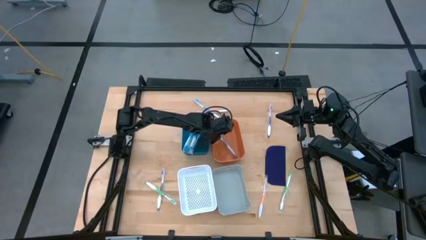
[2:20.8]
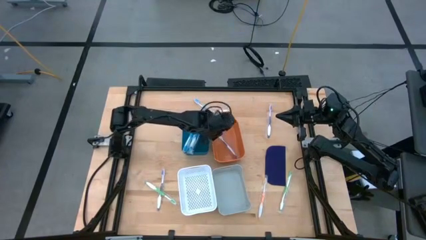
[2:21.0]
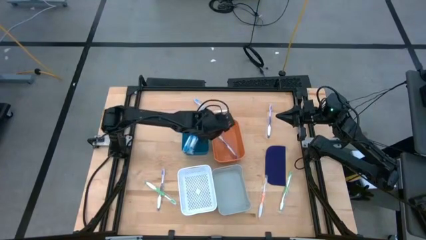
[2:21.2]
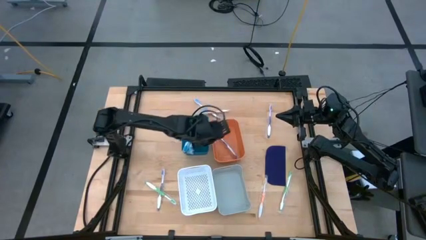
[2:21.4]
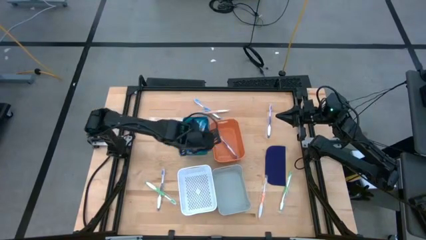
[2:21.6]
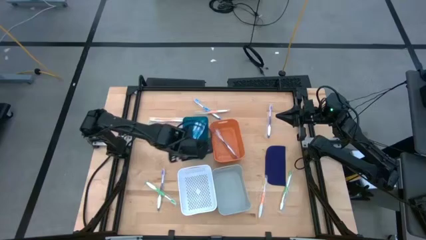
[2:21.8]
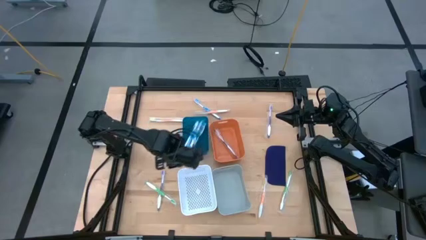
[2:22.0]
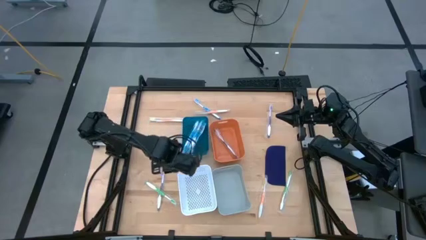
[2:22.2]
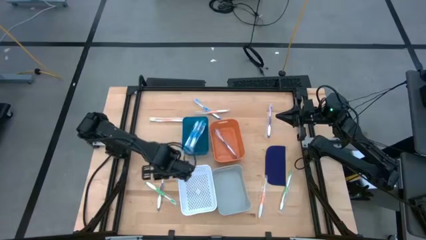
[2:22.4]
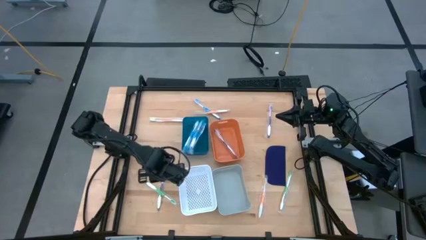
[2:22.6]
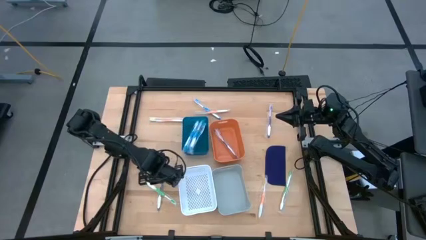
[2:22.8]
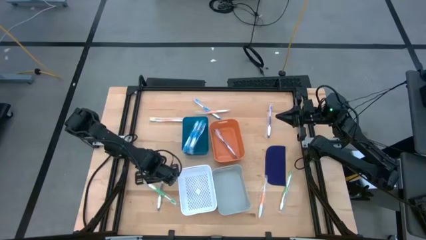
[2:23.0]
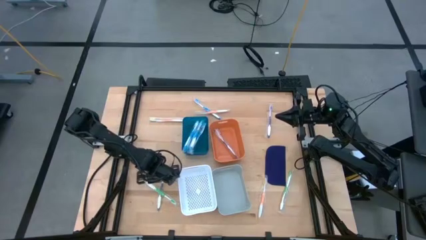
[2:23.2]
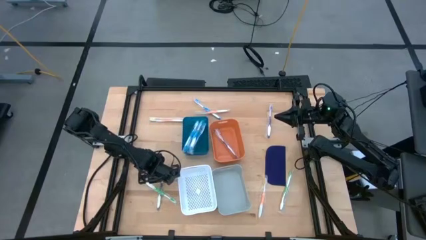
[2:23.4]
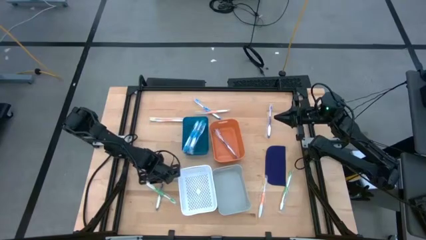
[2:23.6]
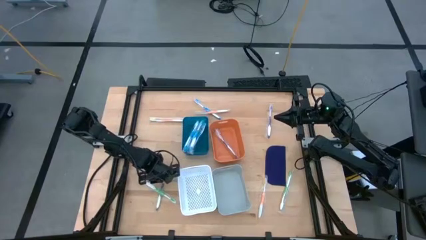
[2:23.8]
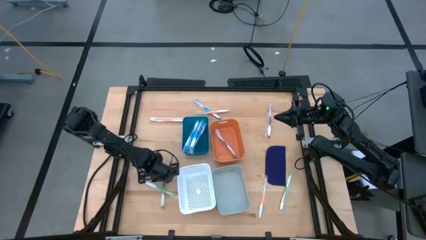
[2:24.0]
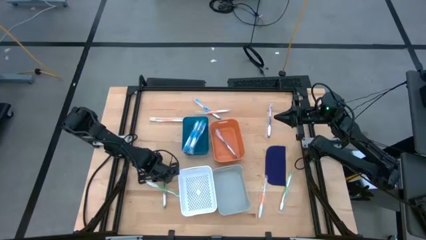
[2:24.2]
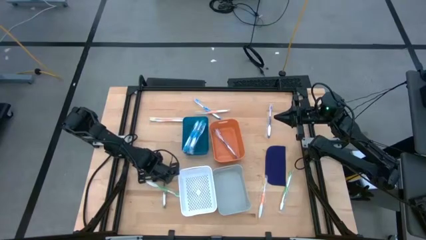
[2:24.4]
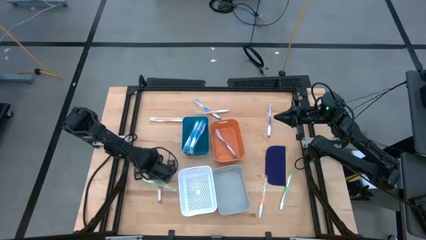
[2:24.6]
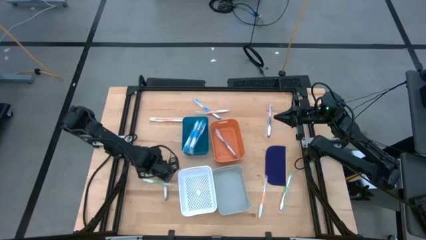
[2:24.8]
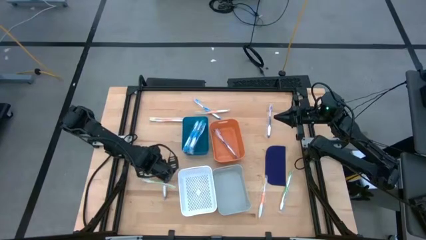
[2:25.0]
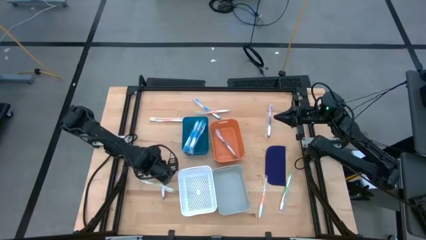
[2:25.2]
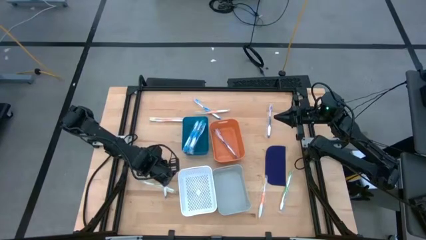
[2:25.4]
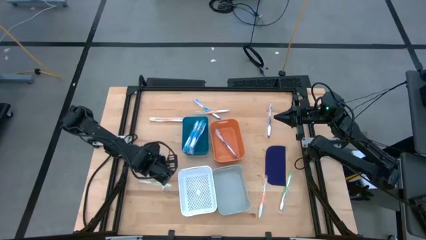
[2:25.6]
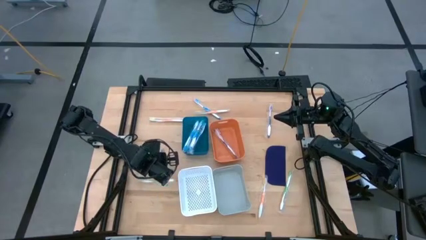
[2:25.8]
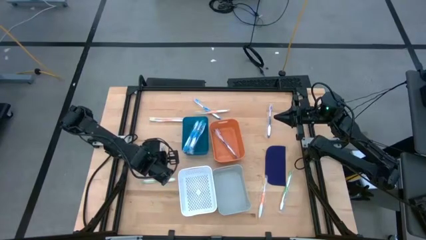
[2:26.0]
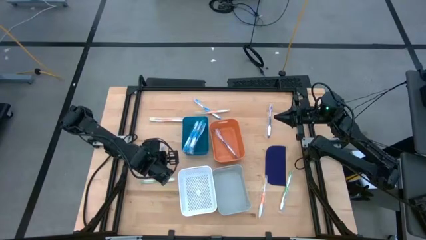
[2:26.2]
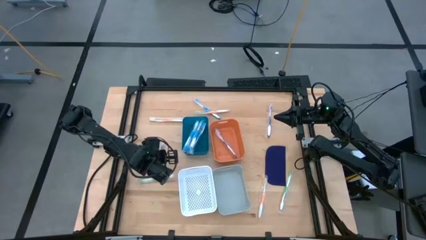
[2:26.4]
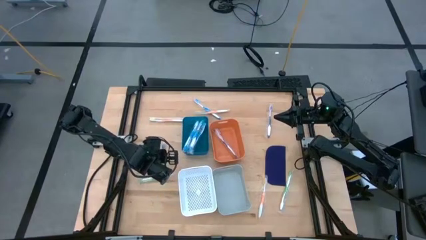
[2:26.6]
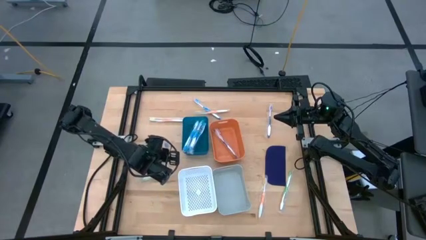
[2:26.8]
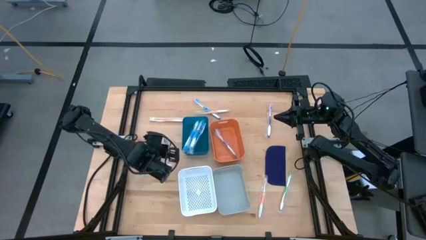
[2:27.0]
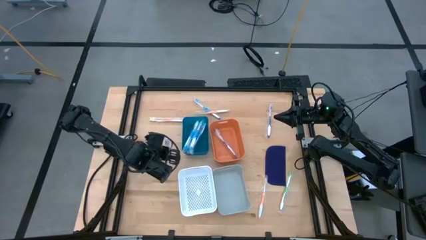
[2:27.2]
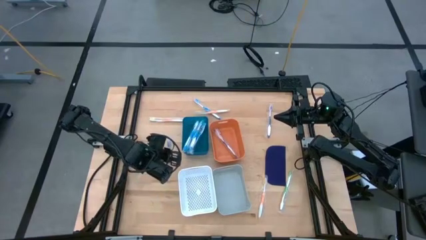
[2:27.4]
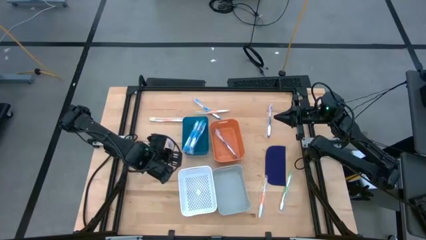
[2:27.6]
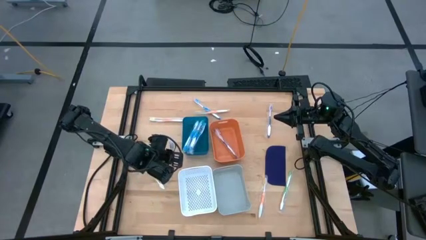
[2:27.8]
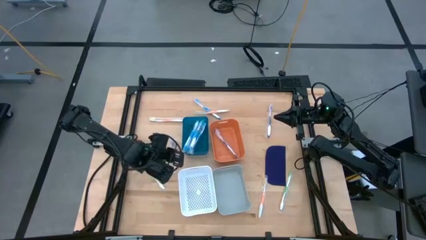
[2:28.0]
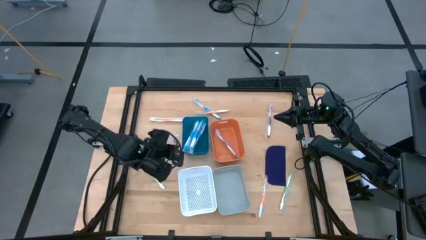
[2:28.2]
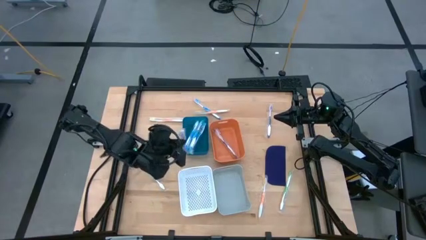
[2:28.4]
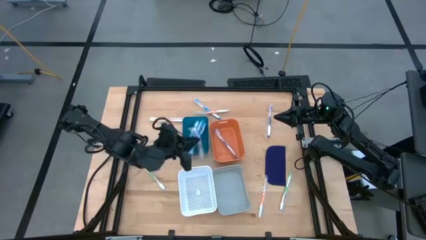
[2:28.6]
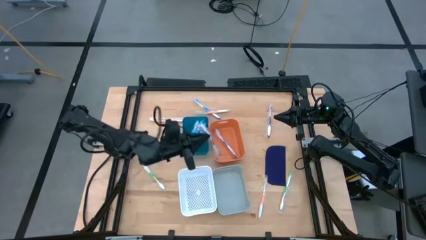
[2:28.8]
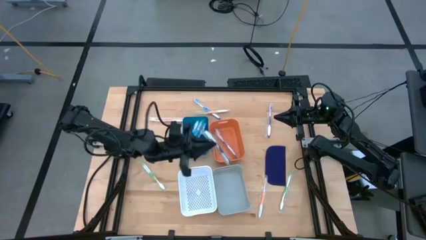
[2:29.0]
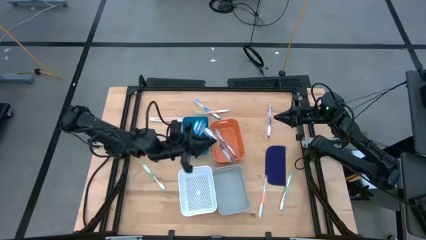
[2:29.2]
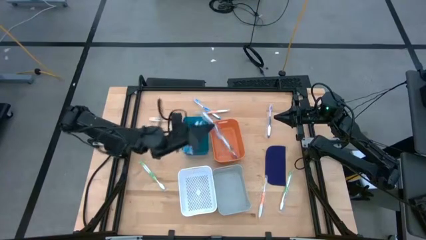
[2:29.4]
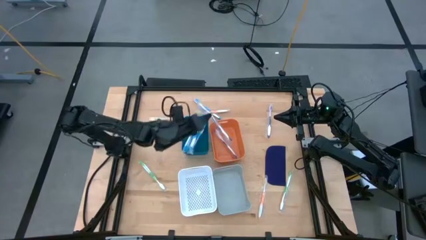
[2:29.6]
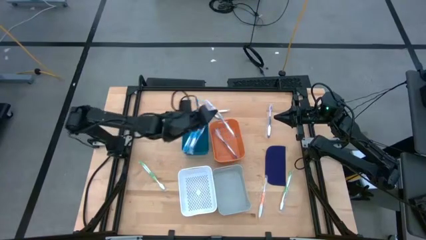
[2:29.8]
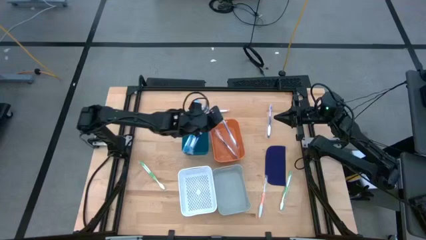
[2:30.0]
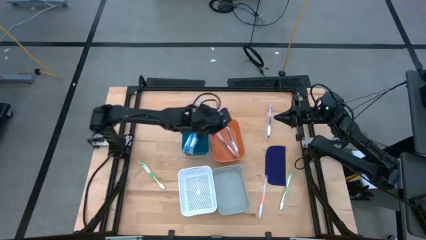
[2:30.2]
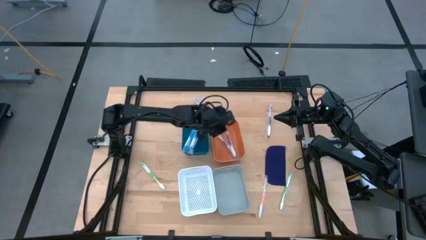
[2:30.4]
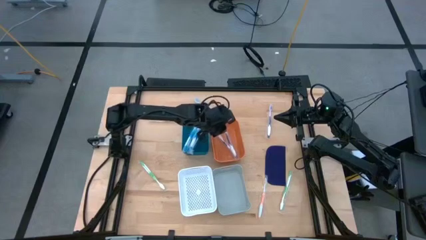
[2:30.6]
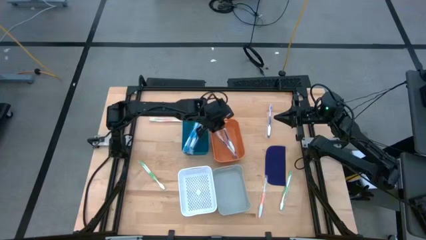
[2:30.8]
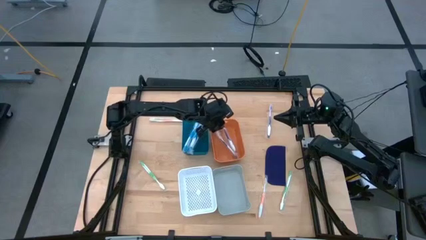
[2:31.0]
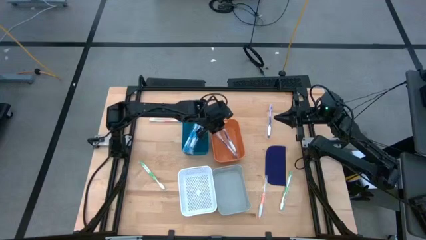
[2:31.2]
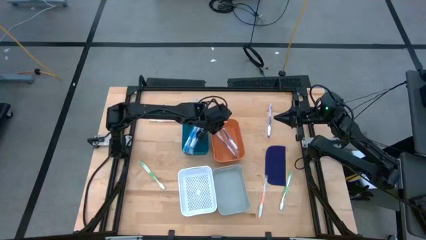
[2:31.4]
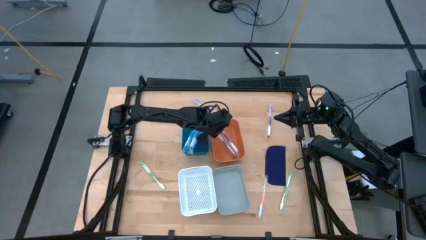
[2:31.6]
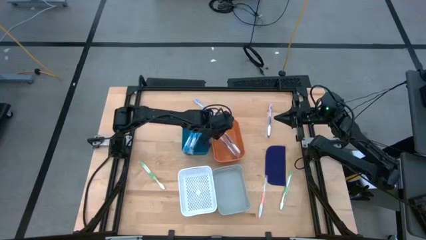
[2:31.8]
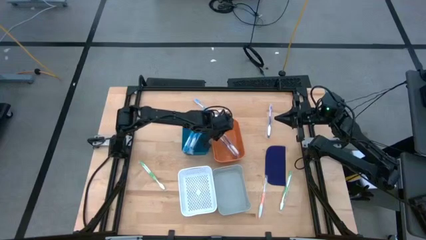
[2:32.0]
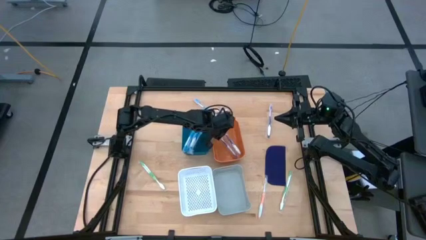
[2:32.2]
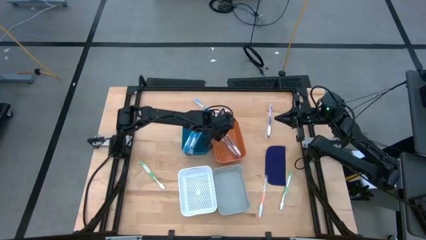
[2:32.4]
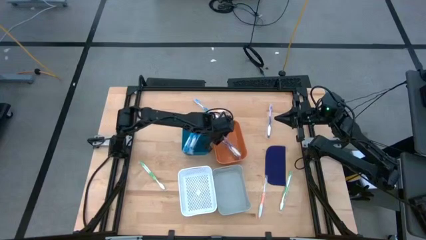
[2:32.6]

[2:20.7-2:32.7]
Task: Pick & Place Toothbrushes
Put the violet toothbrush into the orange bin

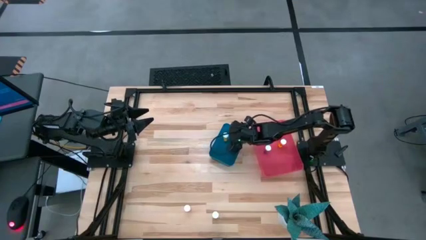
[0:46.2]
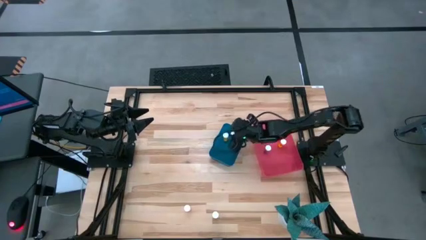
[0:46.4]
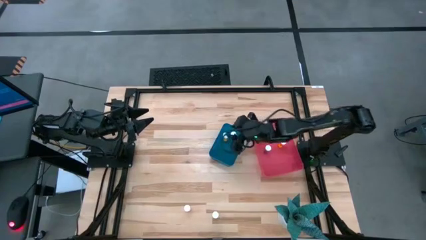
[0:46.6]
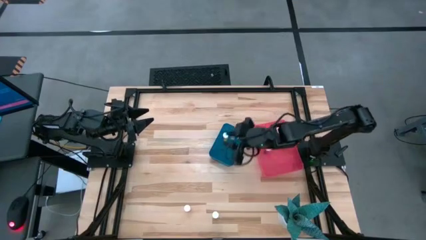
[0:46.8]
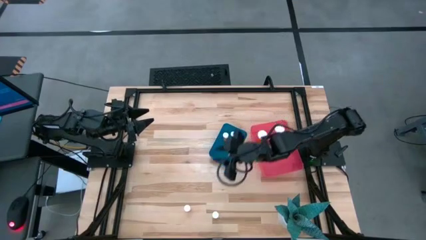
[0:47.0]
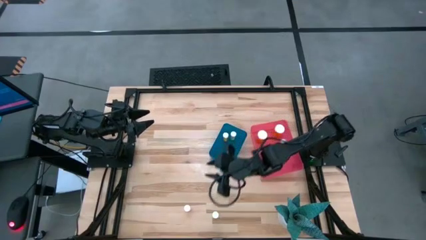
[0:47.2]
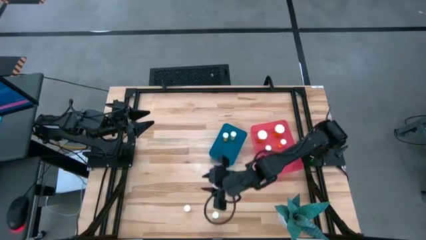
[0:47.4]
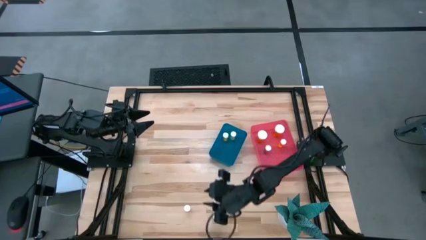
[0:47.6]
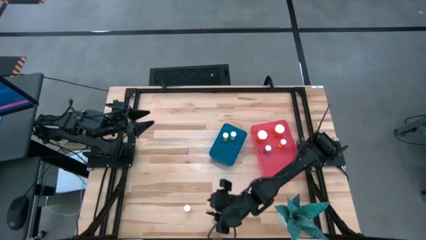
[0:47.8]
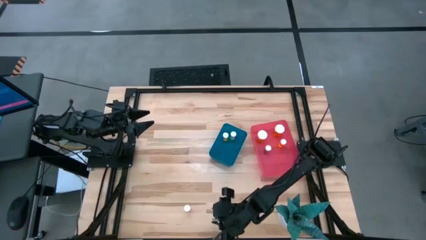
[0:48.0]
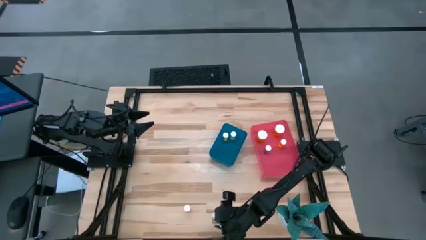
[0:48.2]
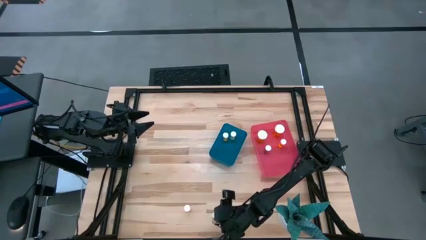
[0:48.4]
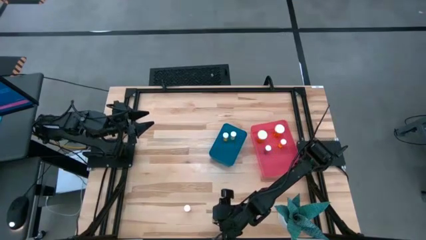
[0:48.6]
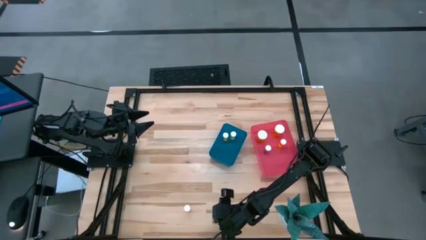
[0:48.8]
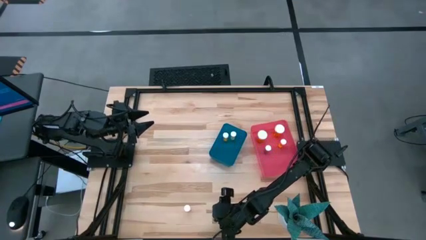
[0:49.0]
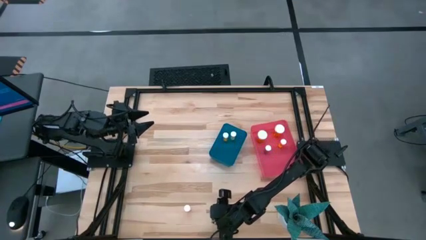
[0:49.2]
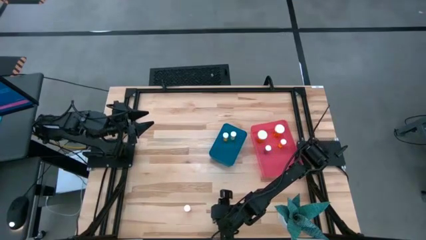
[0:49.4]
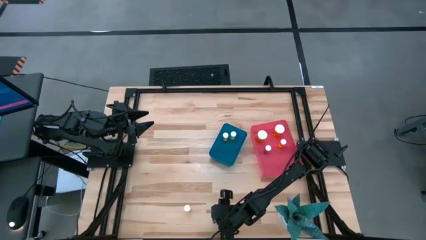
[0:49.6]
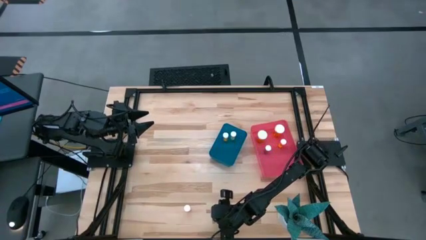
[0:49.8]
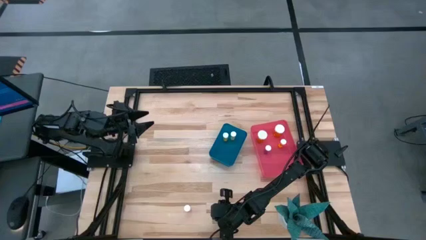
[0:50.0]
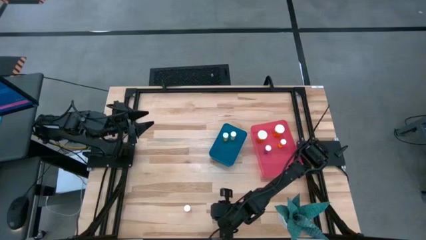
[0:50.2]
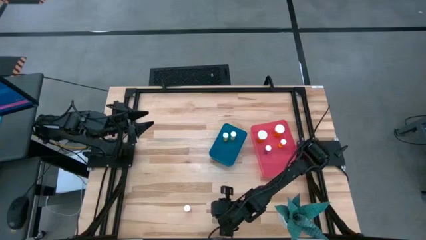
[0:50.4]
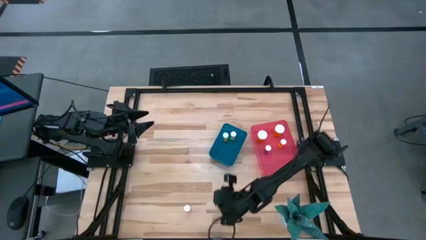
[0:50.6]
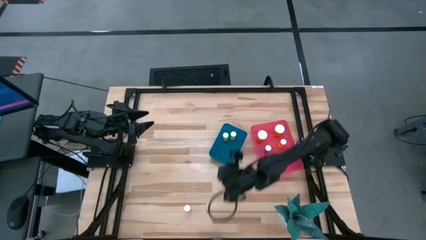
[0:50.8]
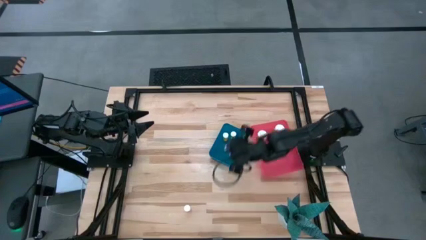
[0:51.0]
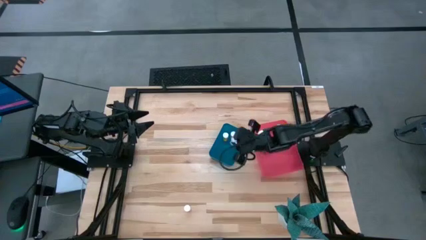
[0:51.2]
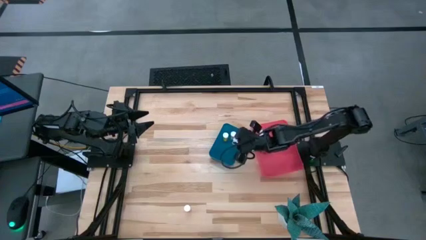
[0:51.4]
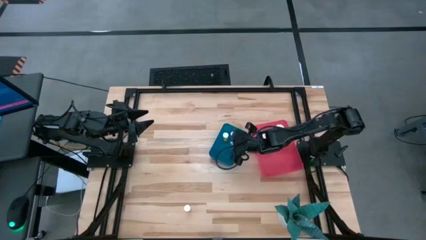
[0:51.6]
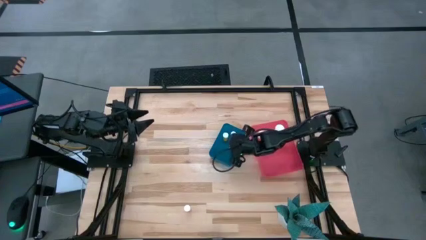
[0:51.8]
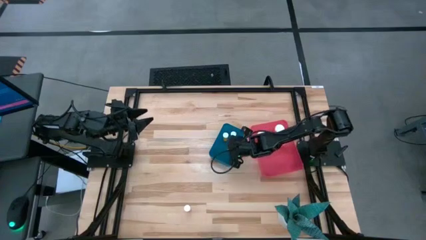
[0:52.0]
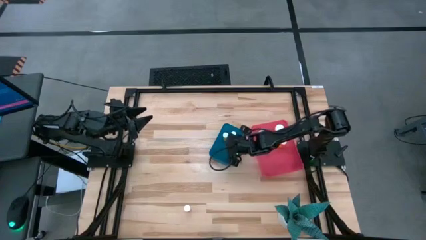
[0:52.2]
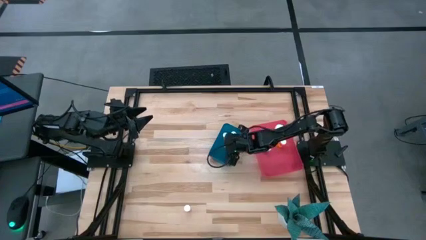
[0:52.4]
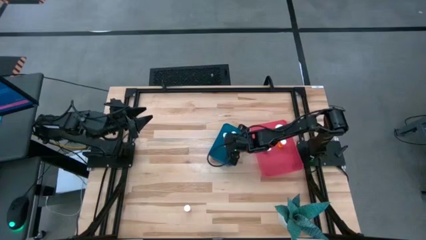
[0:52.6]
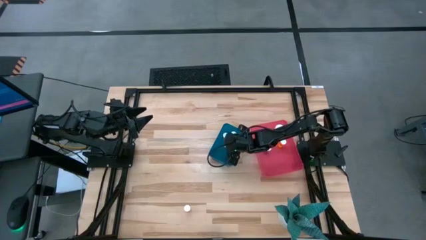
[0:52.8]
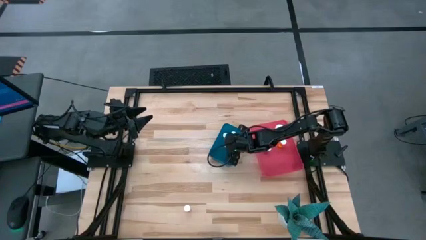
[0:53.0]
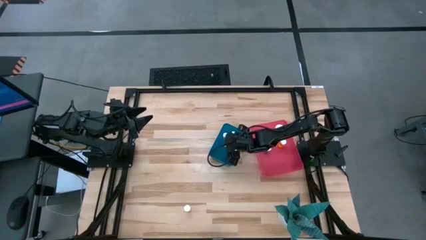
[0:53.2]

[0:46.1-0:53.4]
Task: Pick and place medicine bottles into bin by pill shape (circle, oval)
Put the light blue tablet bottle into the blue bin
